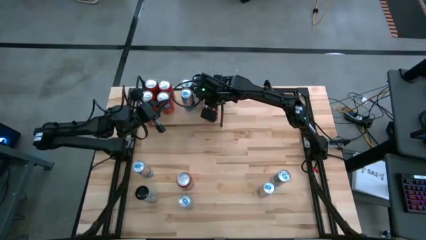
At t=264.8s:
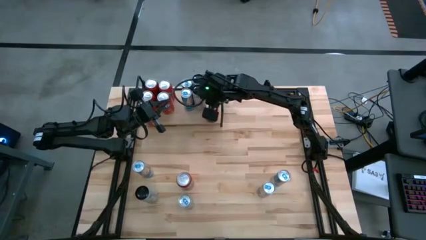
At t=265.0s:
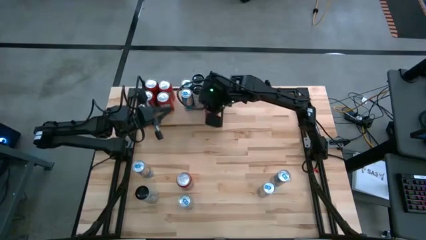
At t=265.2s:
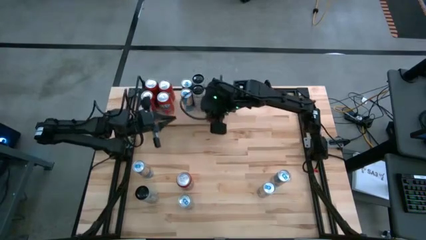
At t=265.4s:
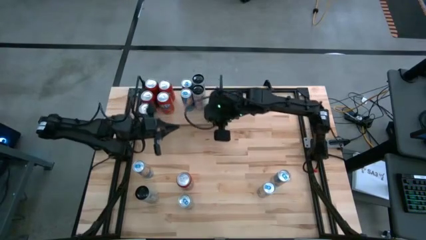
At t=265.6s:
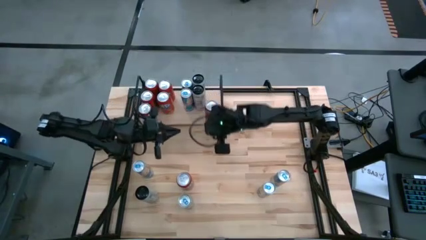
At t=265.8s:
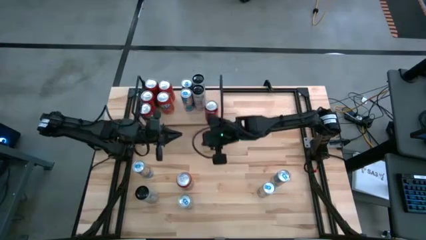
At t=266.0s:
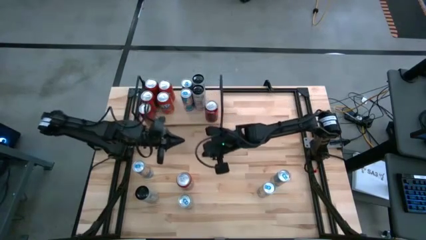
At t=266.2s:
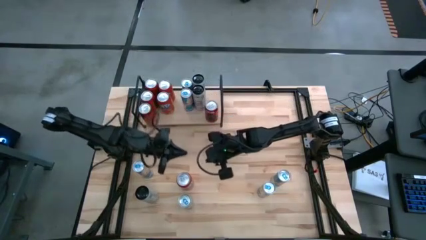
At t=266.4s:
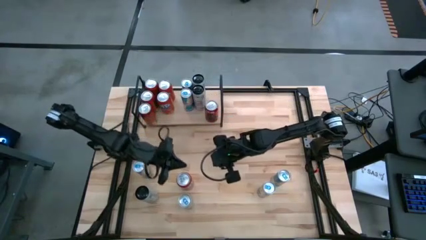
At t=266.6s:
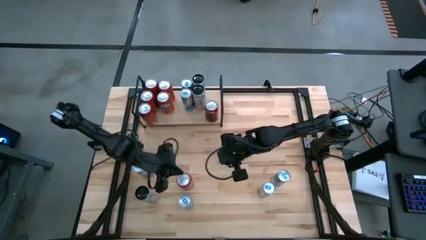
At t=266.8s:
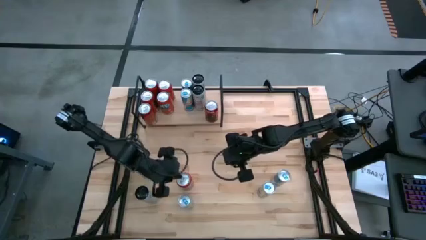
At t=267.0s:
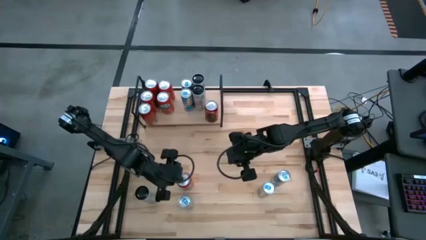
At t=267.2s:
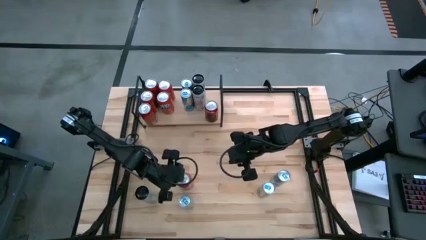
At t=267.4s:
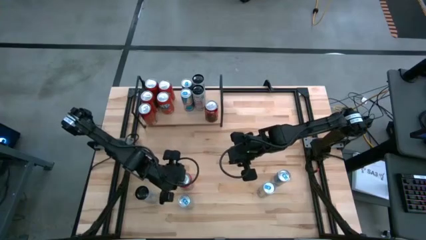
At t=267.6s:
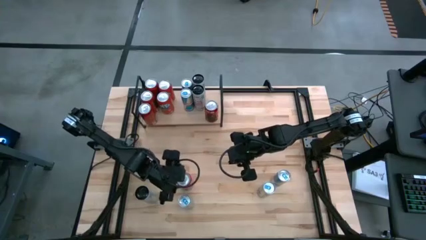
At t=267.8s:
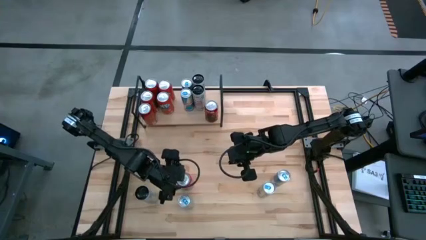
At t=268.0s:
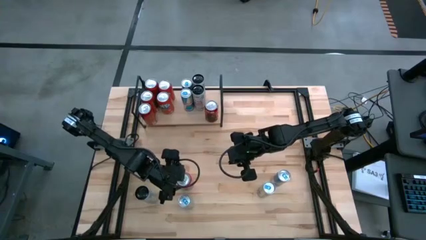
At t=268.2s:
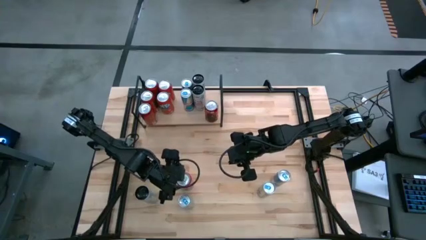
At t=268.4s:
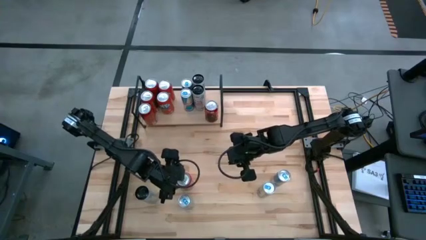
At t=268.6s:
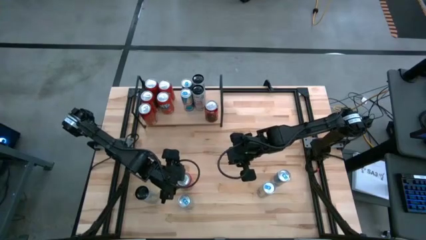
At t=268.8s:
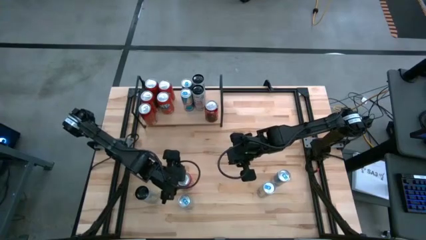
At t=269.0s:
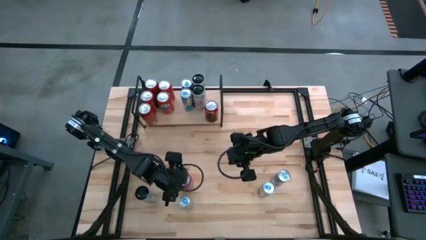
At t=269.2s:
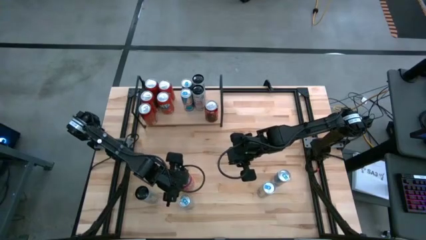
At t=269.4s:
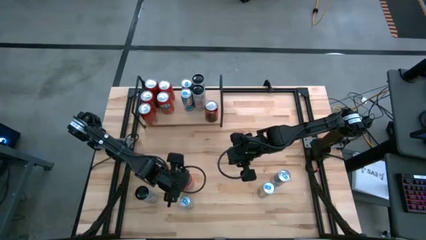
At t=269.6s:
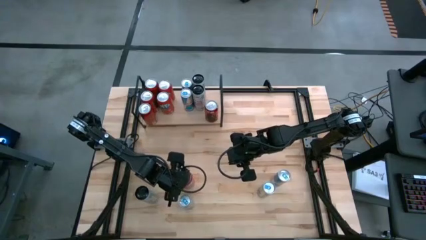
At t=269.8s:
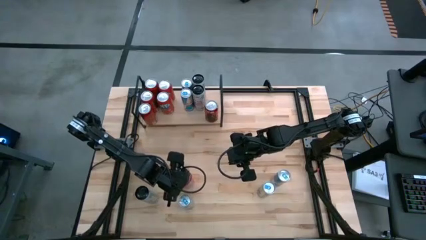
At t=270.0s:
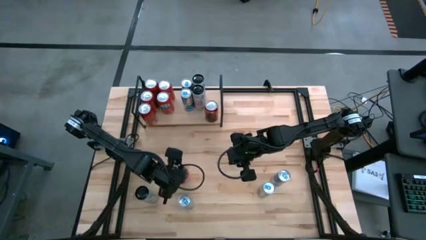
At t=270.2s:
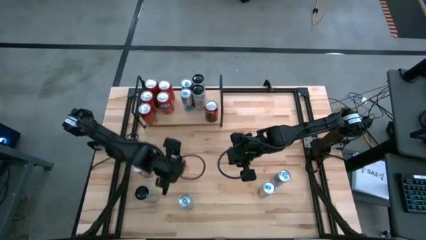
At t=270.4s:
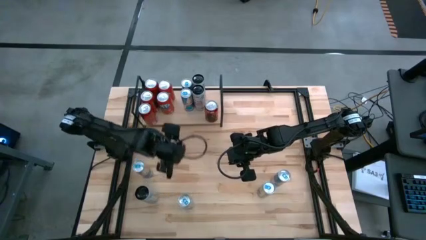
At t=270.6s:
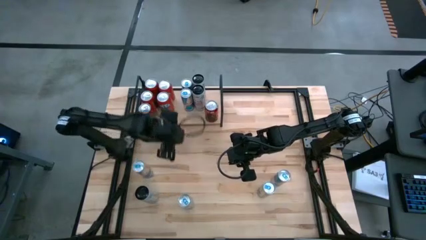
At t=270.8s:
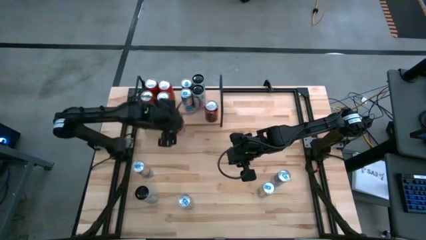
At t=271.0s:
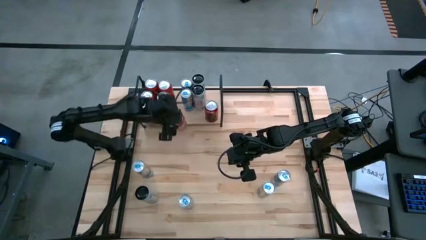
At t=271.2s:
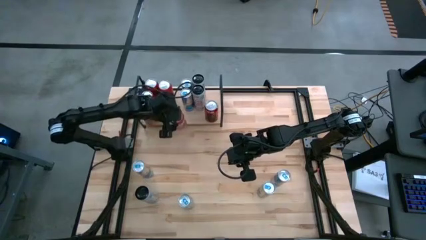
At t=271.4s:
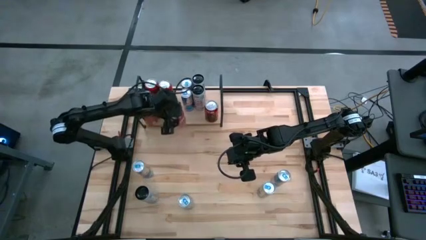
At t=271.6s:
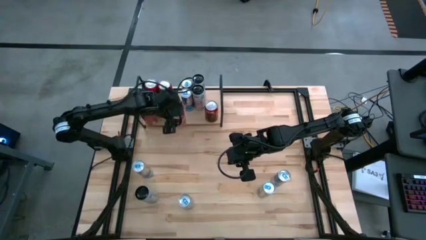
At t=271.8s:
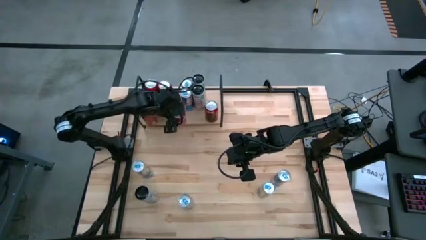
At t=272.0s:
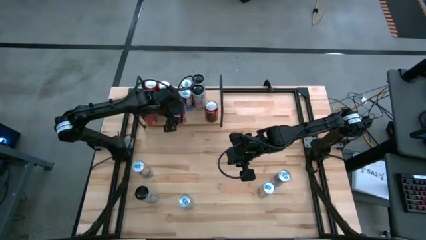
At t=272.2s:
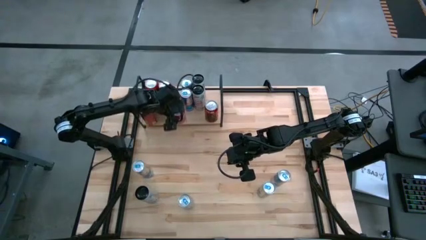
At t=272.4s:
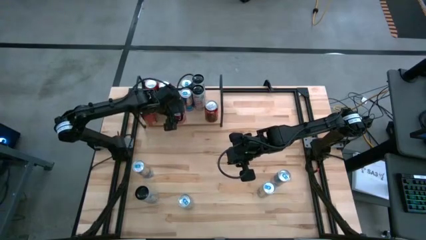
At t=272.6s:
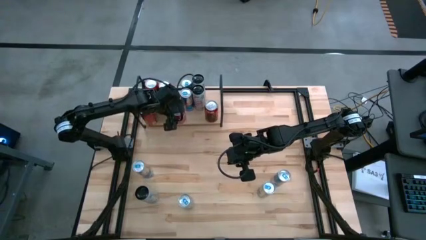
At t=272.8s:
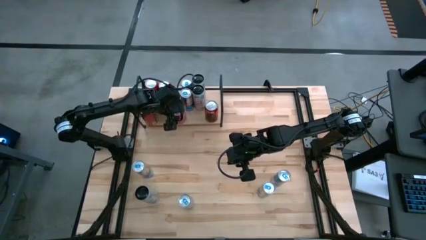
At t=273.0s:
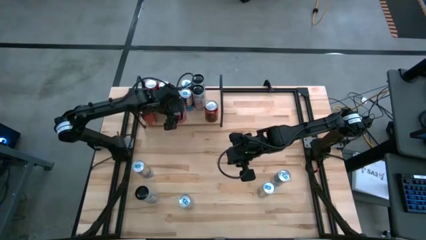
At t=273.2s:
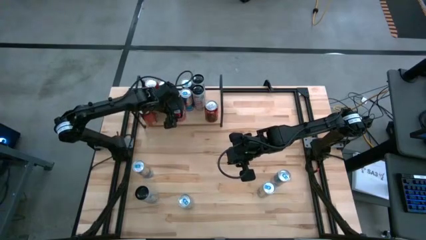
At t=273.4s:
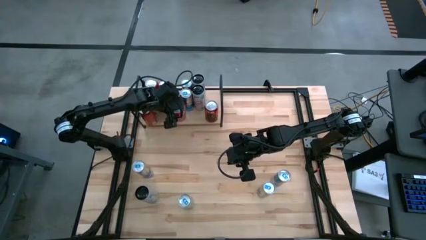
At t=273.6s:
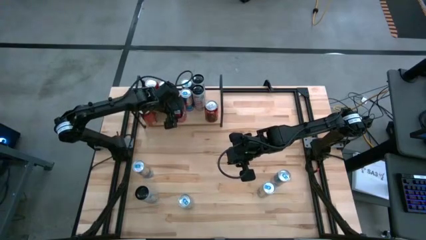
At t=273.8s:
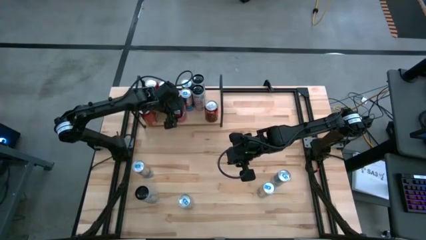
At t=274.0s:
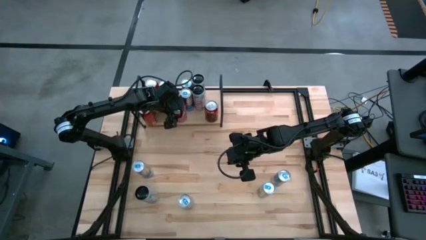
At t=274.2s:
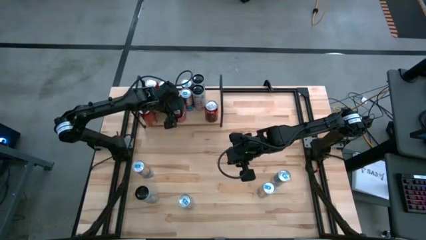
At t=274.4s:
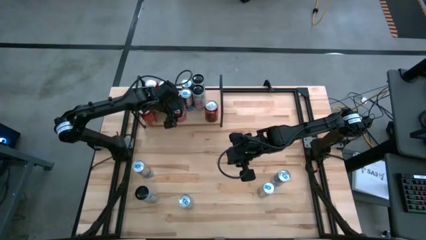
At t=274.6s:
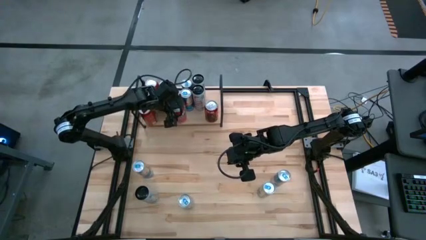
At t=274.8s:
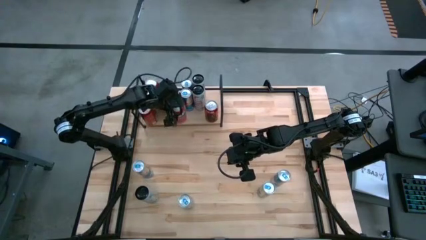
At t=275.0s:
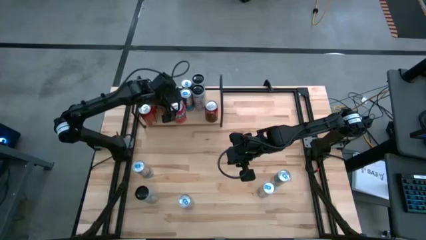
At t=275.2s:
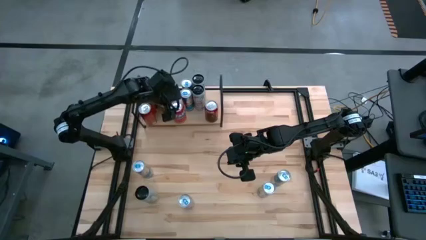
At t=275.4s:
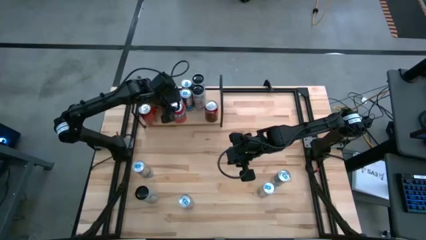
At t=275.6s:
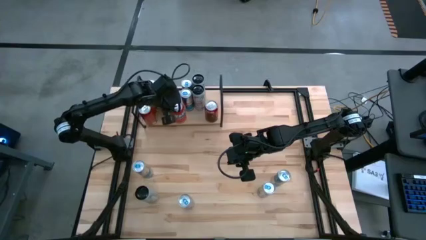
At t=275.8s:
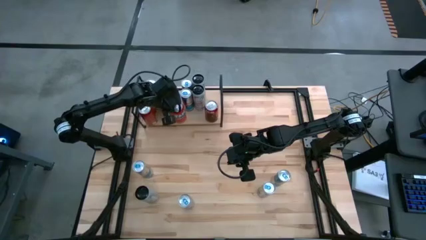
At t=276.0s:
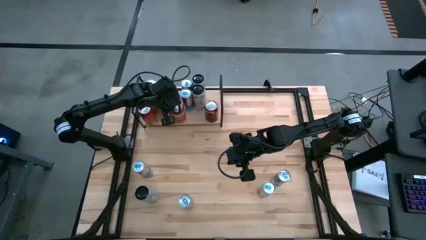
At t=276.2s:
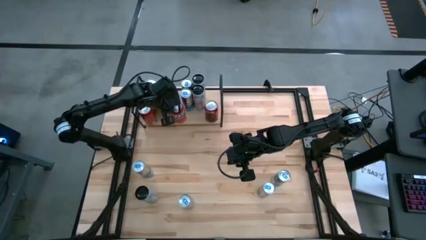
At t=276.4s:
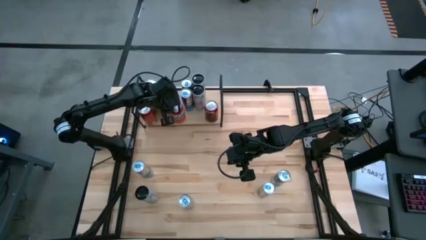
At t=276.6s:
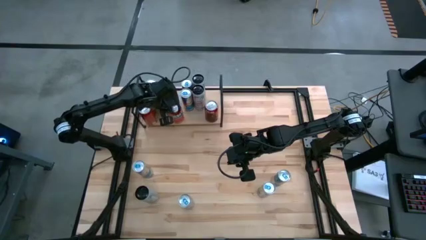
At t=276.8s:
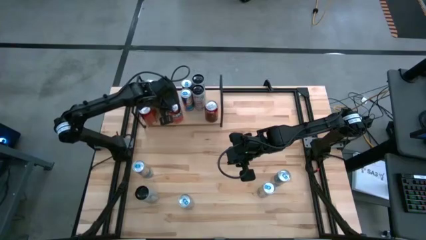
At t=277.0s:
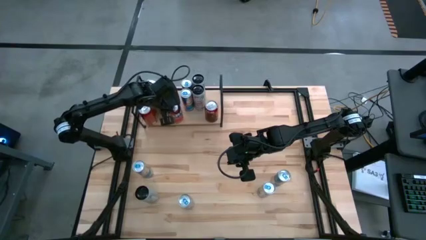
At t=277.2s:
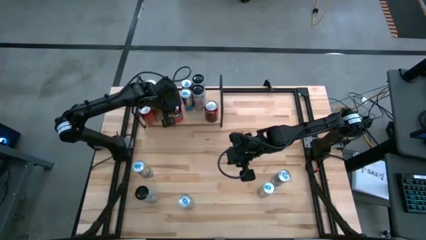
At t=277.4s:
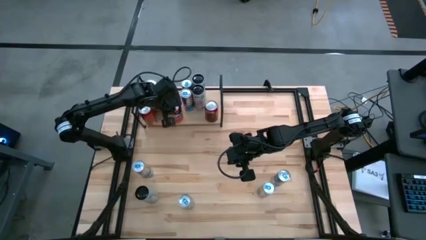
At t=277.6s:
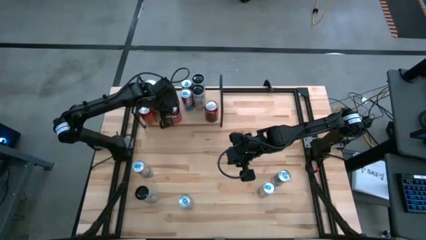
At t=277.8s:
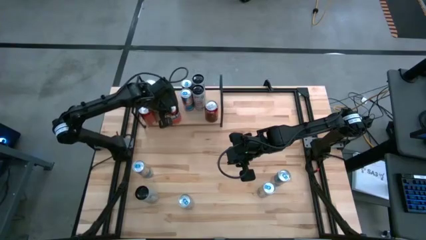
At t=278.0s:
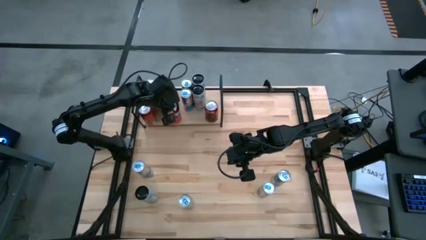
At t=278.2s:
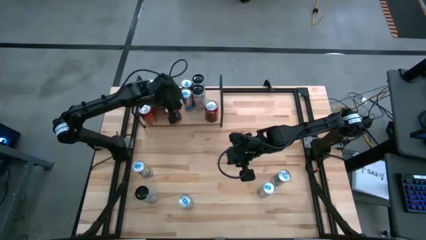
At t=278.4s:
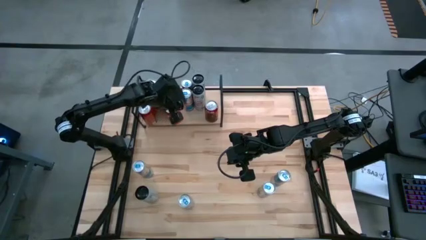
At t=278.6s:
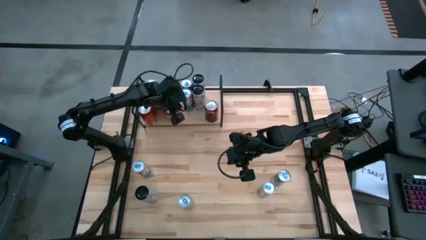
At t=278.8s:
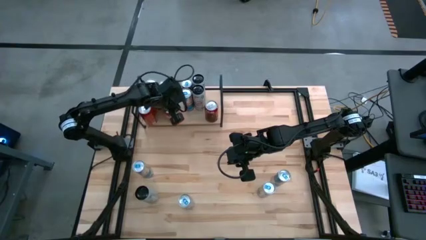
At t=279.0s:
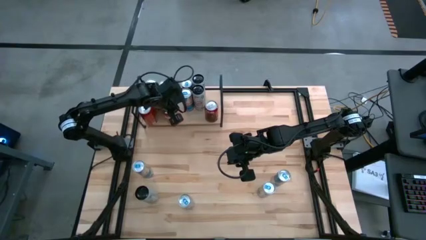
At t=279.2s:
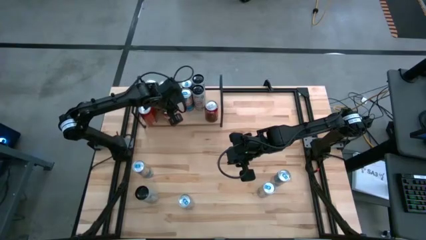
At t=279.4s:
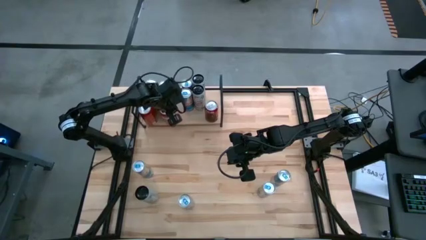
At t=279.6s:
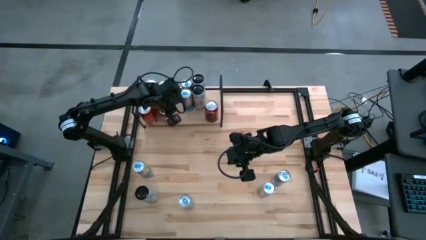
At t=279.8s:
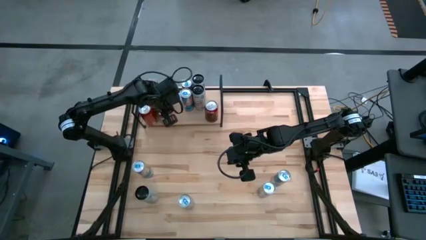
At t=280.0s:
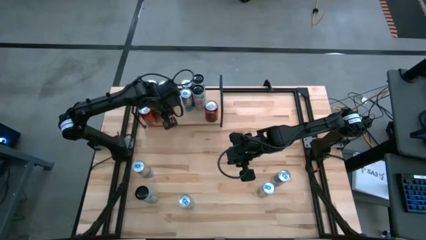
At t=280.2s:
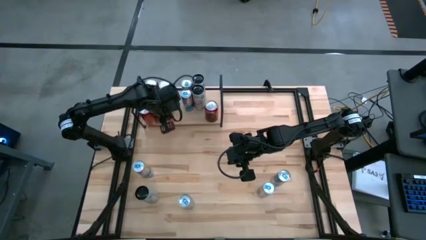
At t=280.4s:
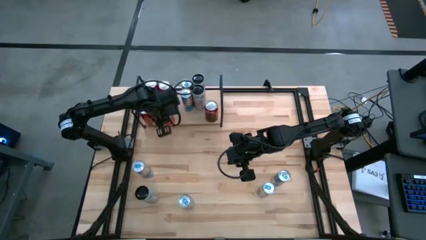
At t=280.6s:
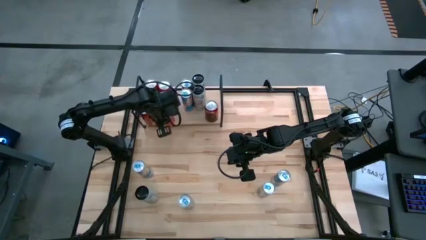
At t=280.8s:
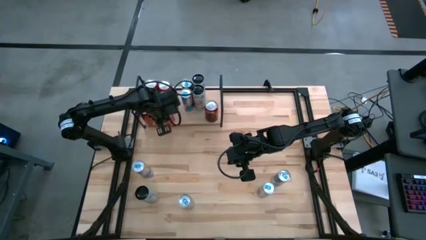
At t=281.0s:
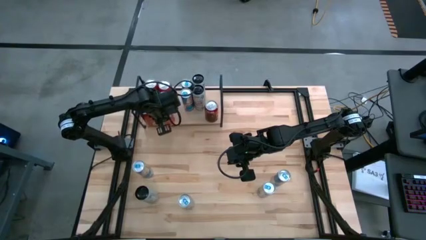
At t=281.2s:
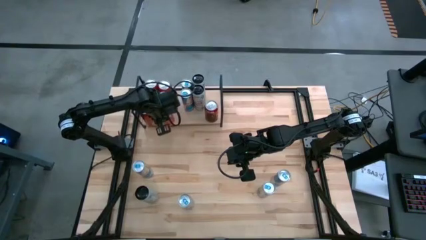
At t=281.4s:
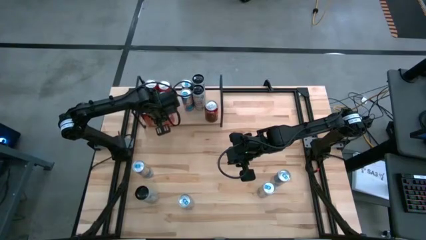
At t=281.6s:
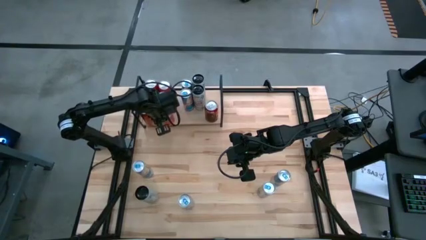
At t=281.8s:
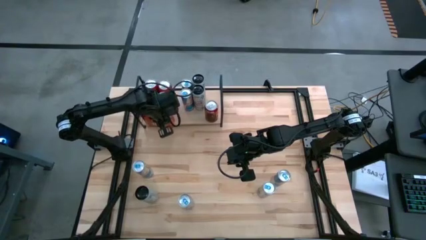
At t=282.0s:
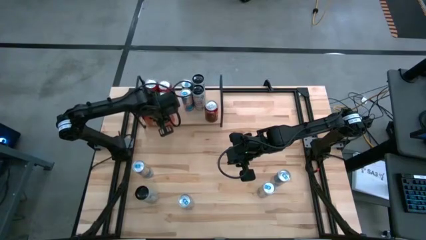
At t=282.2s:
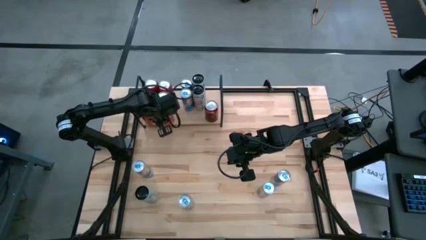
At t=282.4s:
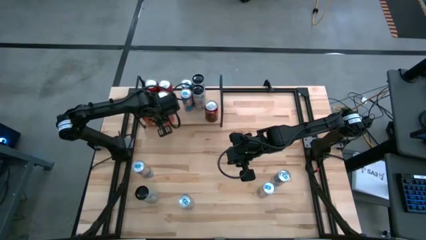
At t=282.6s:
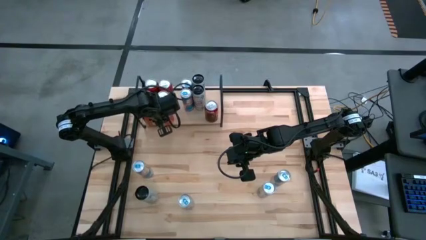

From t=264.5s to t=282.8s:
Task: Place canned beverage on shelf
Put the red soda can on the shelf aligned with the other red soda can
